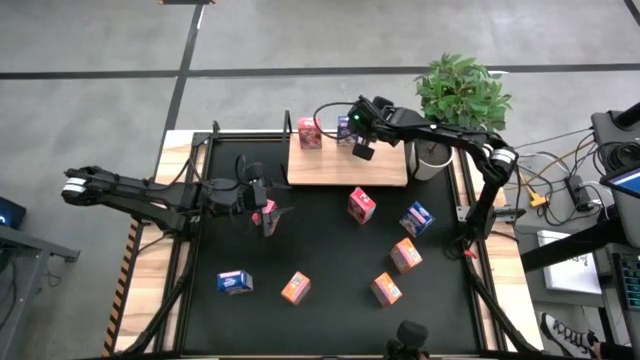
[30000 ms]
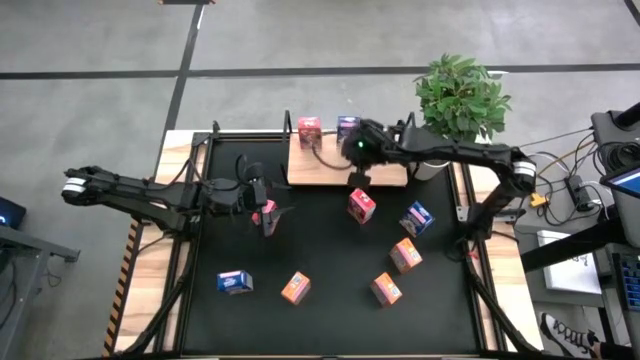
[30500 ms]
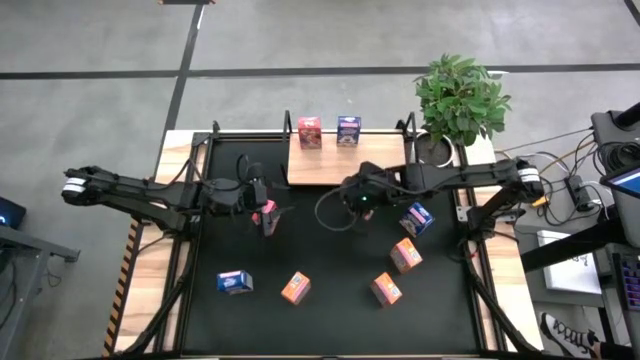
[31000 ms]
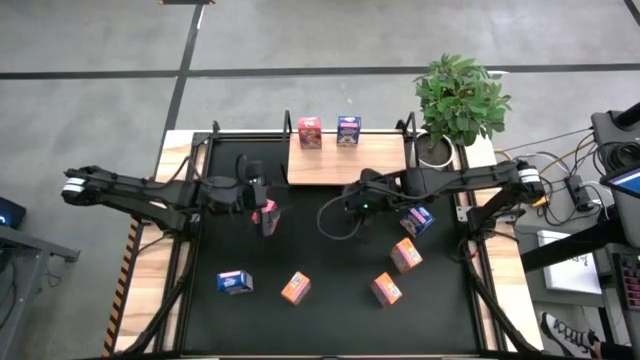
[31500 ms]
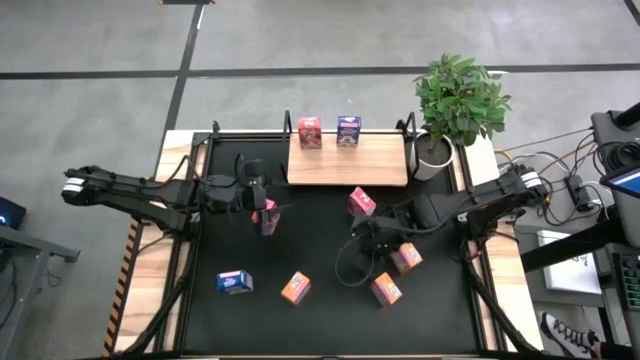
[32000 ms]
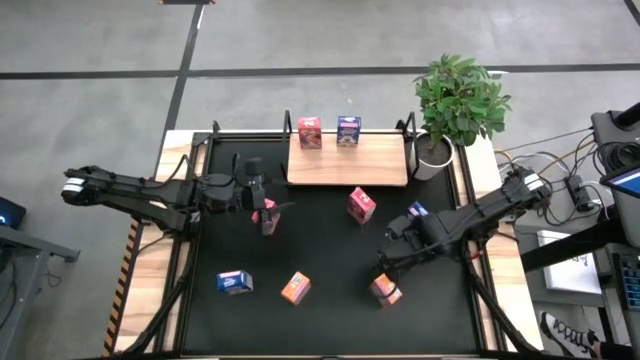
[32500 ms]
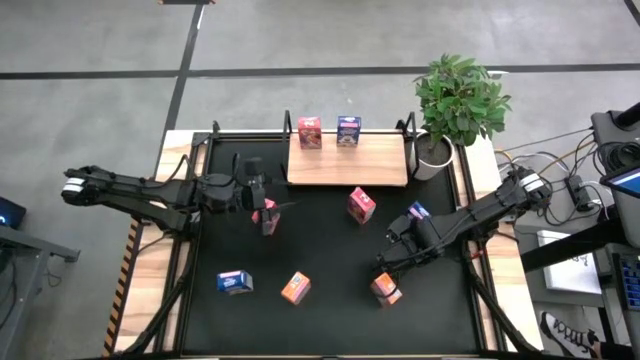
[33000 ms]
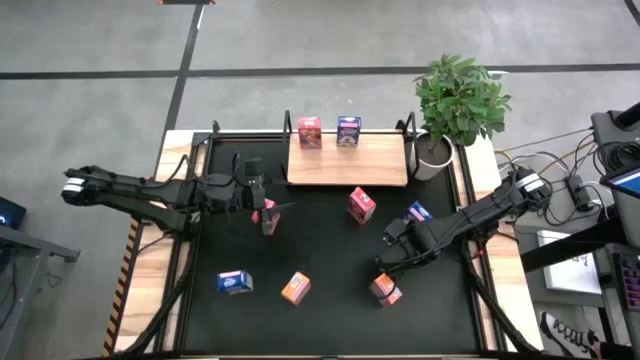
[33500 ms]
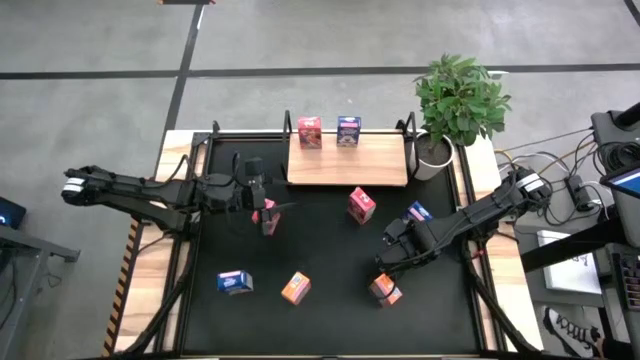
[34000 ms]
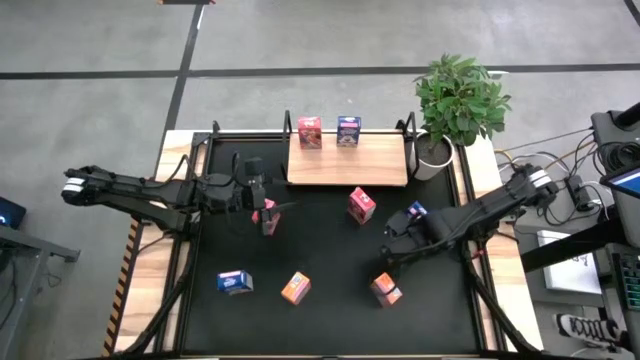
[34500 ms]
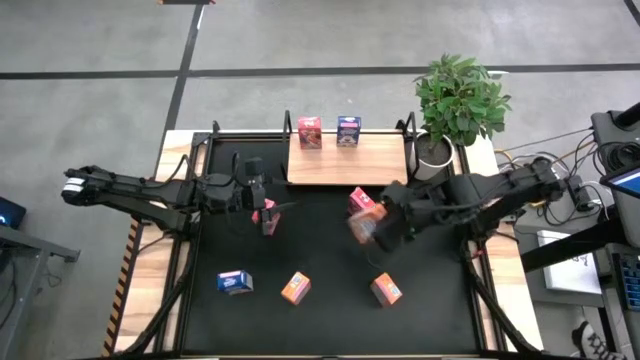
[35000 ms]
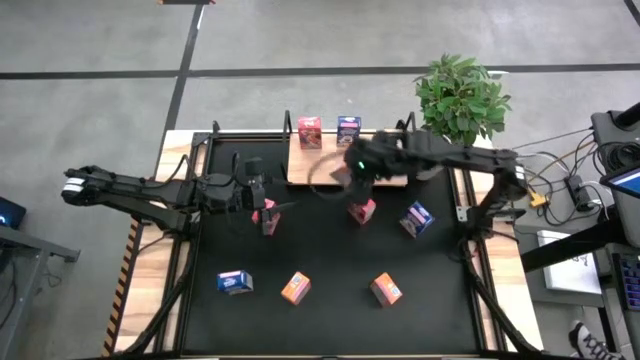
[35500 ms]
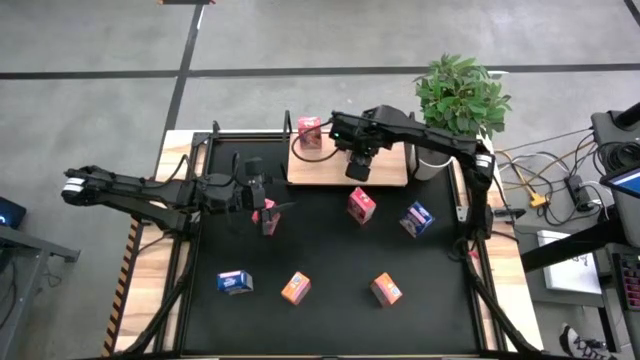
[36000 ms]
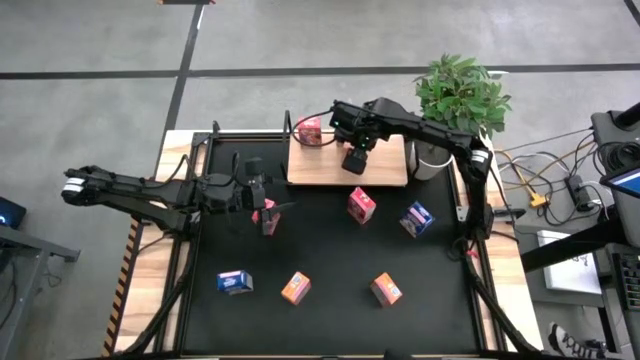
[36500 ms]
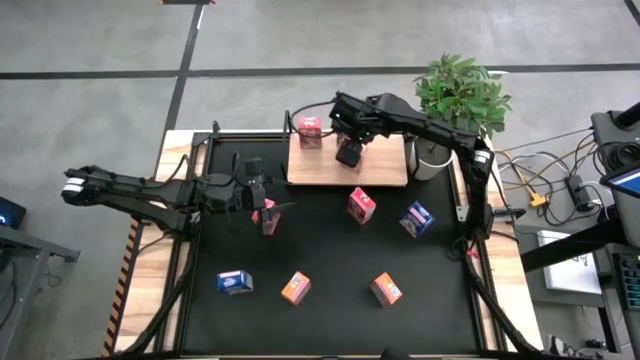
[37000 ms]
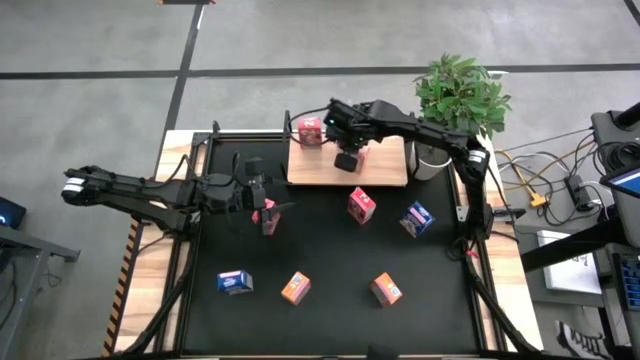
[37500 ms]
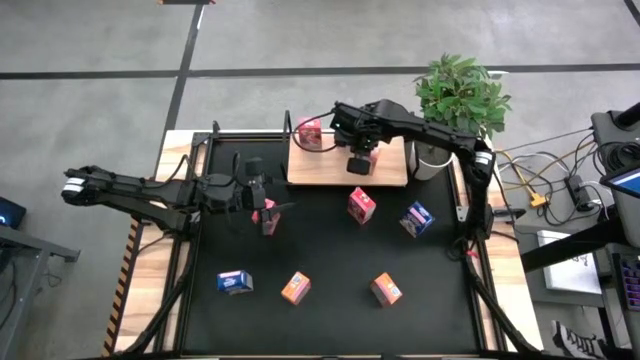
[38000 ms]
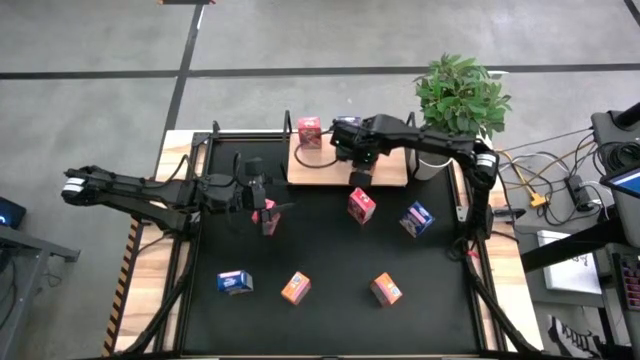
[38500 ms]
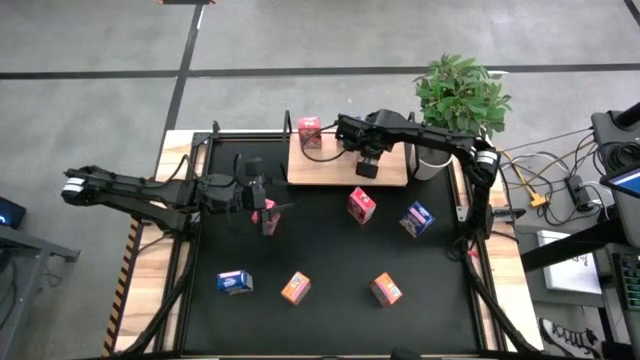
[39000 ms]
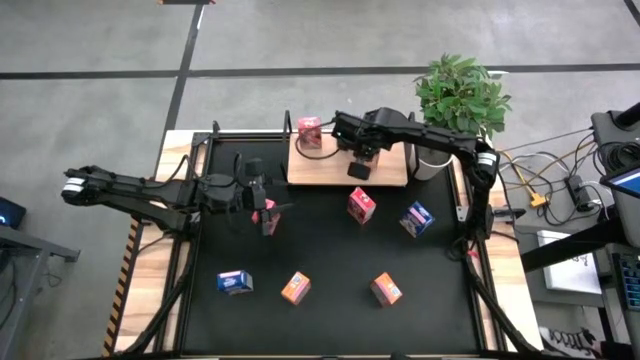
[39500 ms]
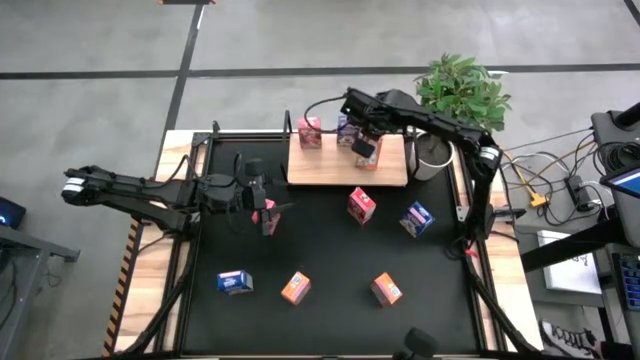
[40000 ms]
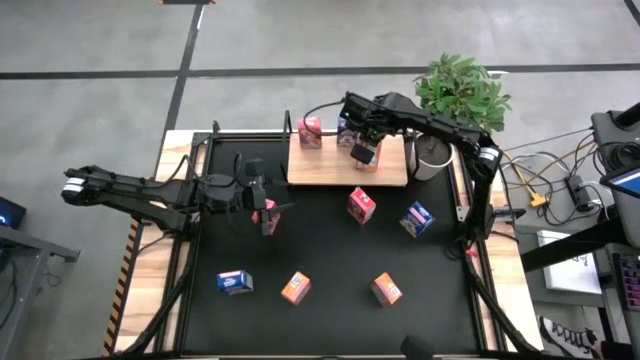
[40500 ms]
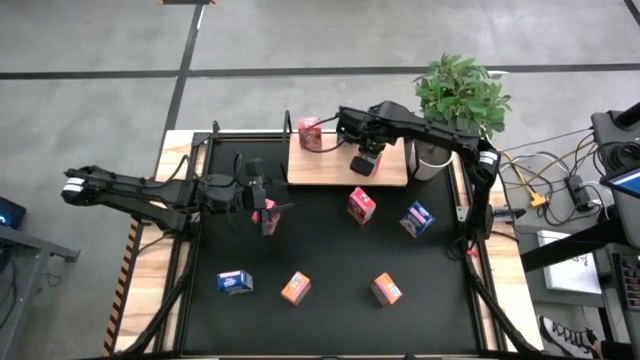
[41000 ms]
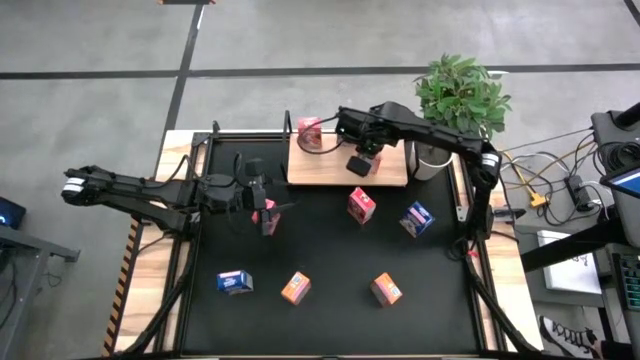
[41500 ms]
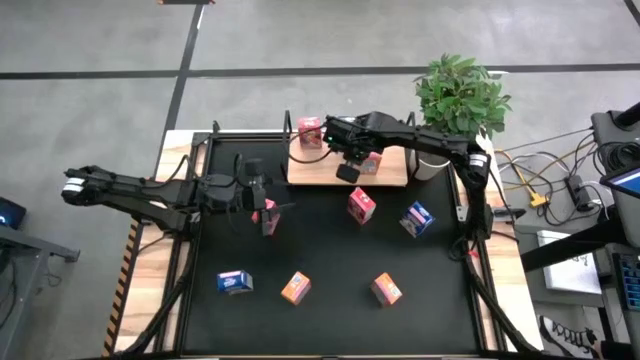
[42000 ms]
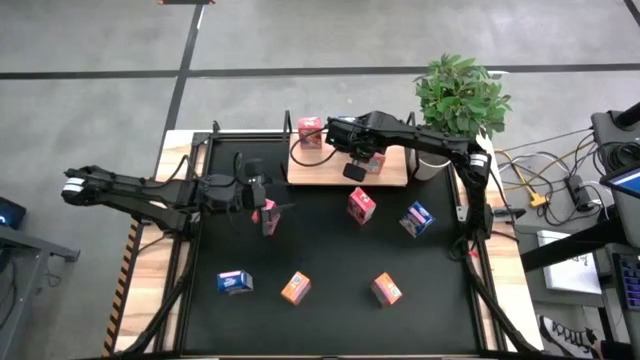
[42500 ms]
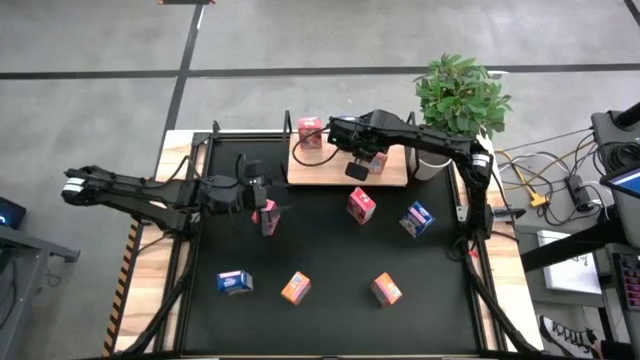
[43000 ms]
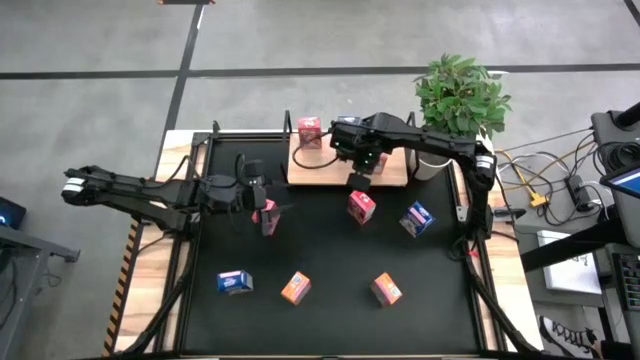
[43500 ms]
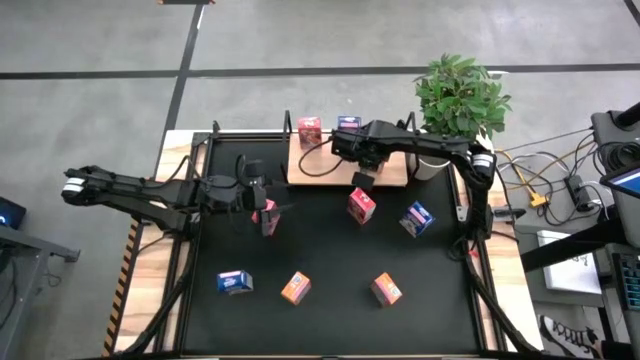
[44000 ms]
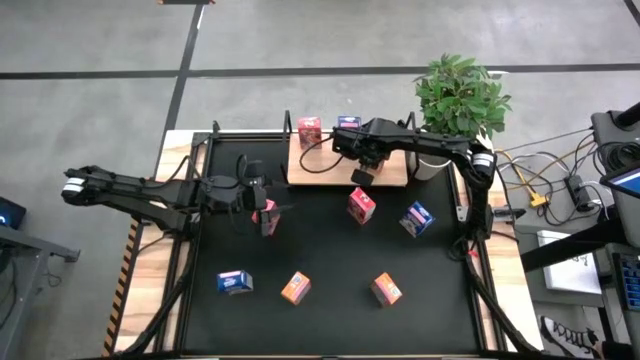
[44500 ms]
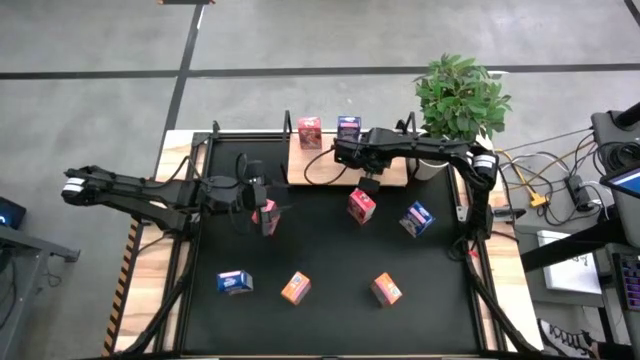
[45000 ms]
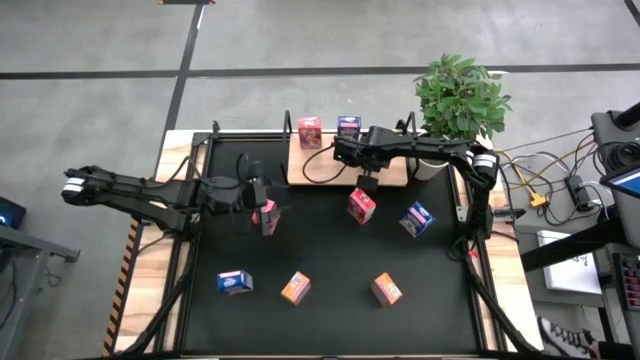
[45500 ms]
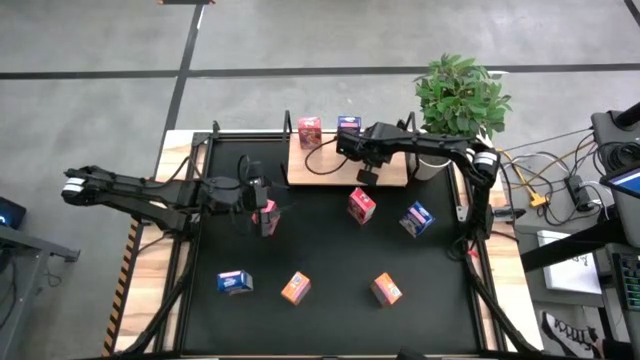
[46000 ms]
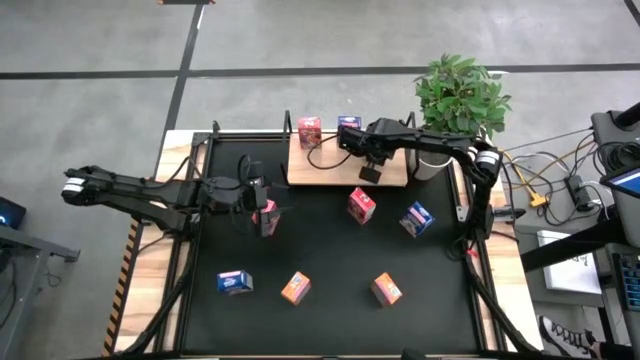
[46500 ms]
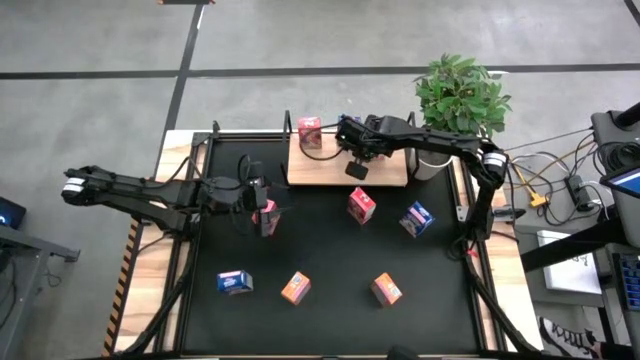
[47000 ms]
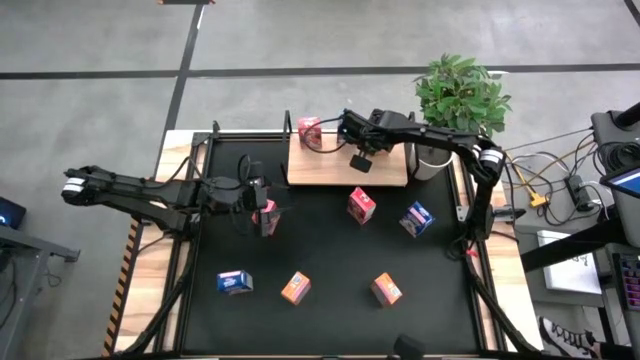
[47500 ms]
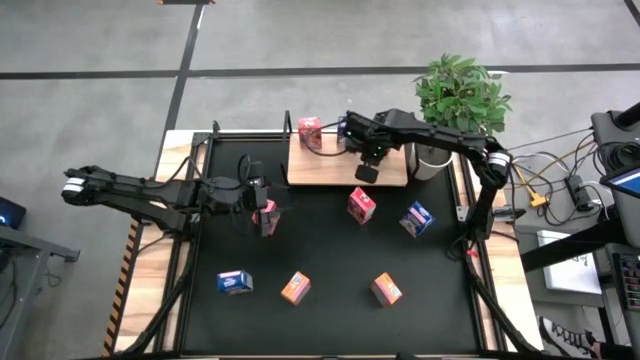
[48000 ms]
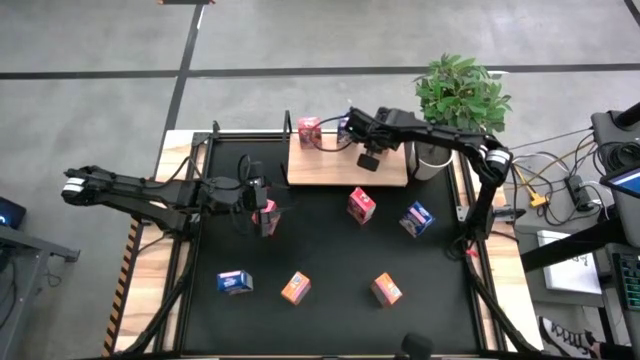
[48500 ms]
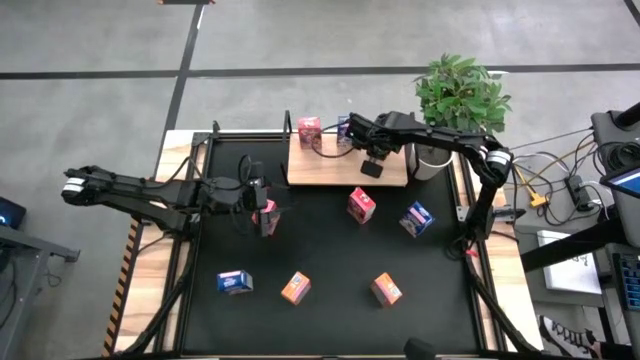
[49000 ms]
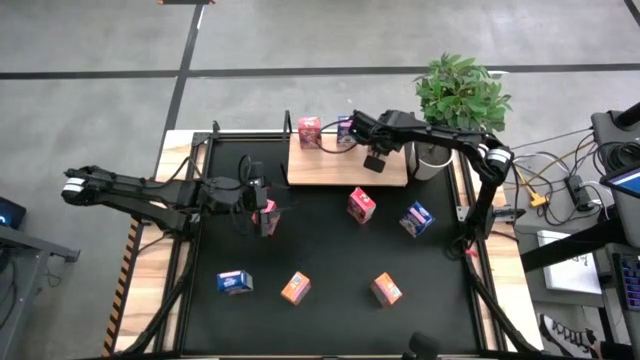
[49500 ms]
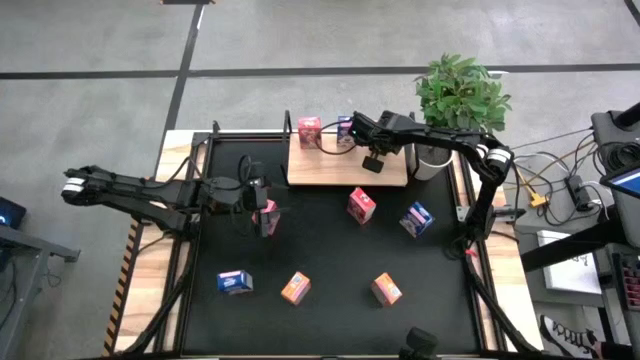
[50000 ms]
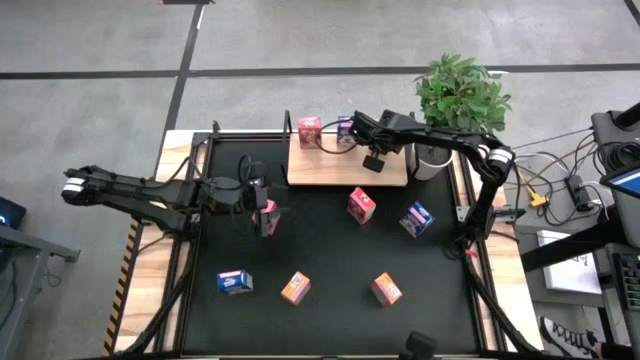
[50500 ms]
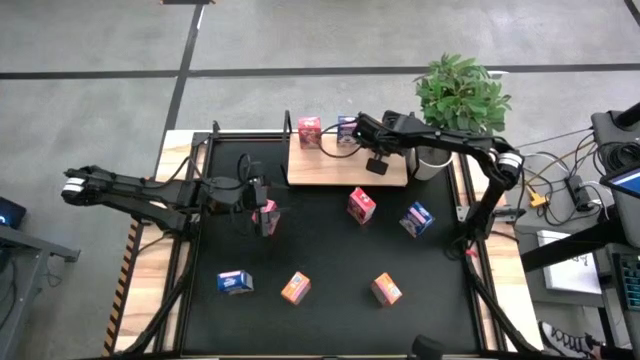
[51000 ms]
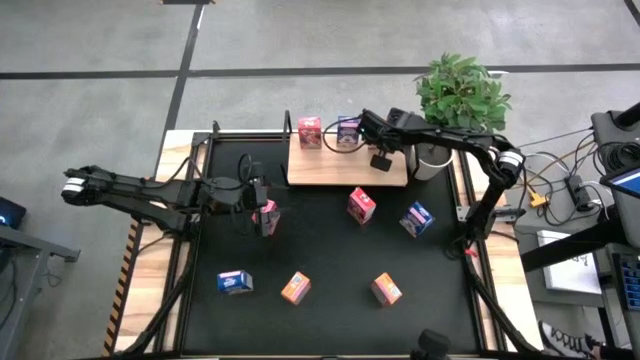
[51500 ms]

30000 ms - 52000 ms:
Task: Stack cereal on shelf
Put the top orange cereal box on the shelf
